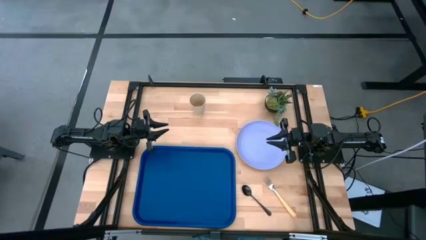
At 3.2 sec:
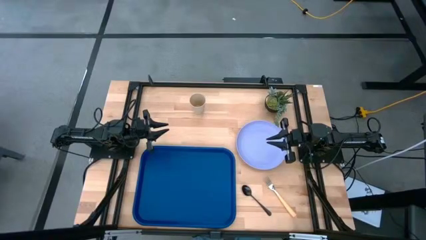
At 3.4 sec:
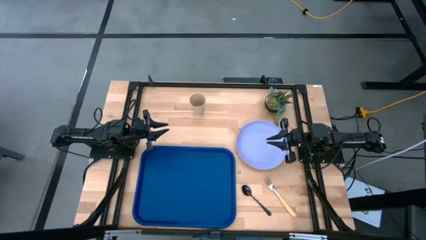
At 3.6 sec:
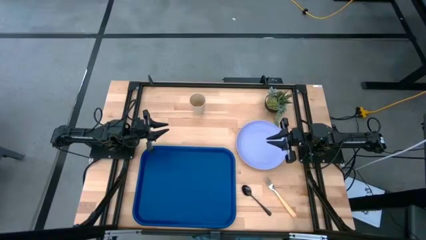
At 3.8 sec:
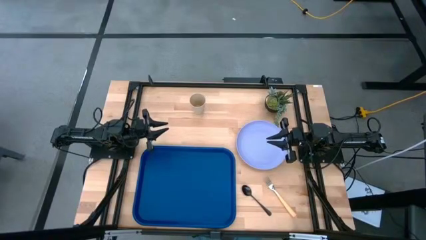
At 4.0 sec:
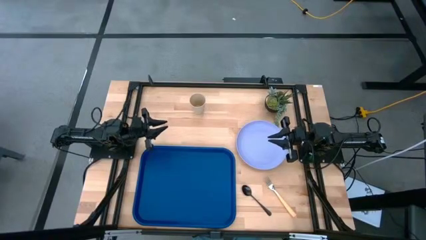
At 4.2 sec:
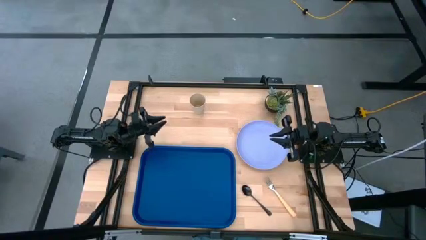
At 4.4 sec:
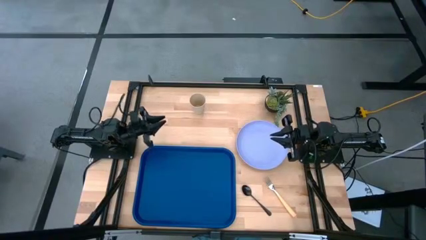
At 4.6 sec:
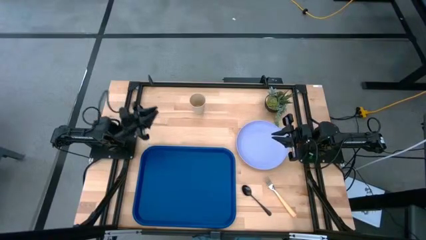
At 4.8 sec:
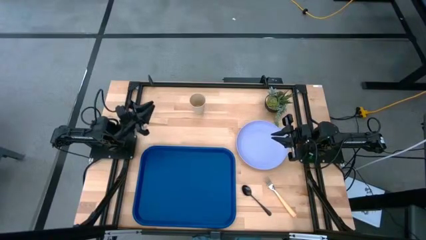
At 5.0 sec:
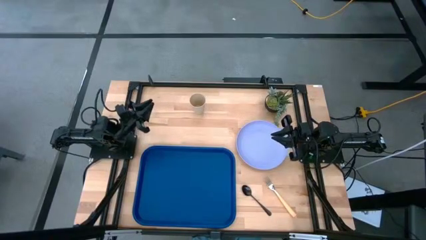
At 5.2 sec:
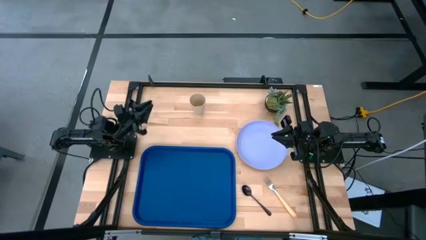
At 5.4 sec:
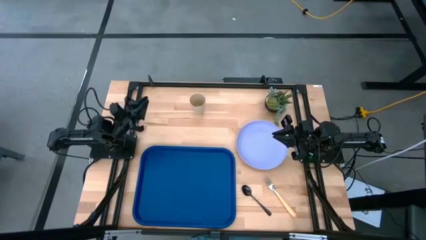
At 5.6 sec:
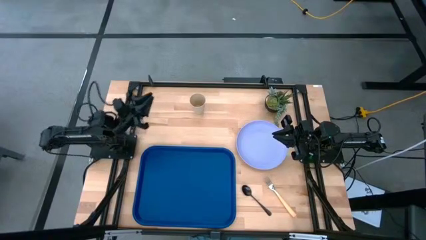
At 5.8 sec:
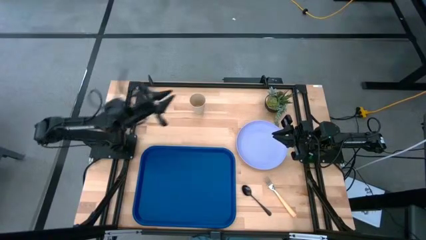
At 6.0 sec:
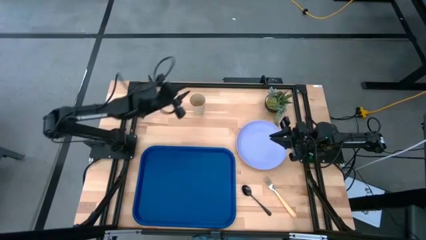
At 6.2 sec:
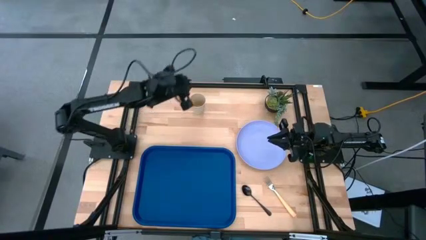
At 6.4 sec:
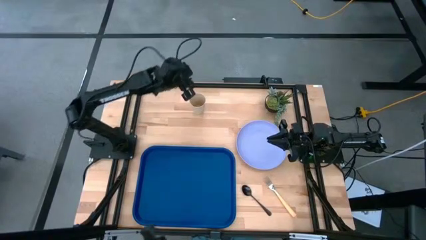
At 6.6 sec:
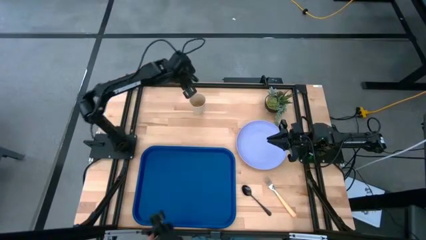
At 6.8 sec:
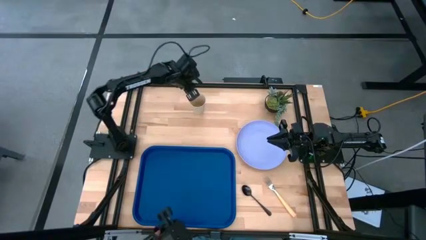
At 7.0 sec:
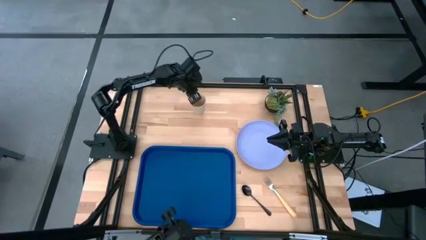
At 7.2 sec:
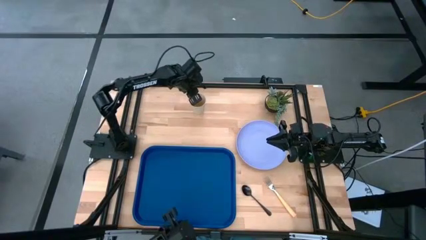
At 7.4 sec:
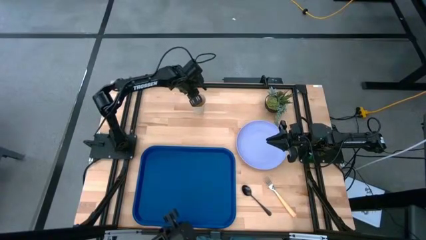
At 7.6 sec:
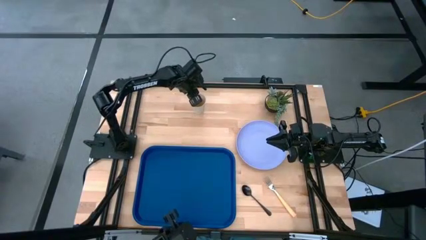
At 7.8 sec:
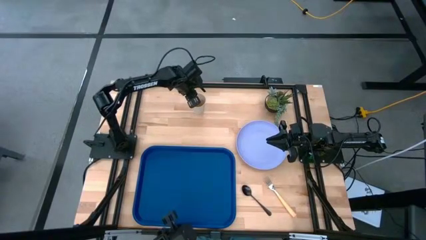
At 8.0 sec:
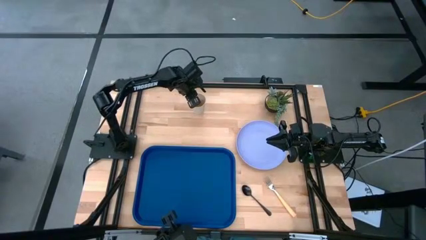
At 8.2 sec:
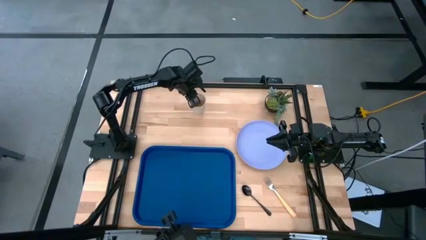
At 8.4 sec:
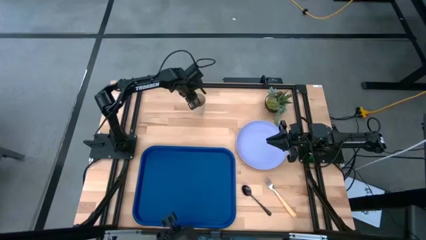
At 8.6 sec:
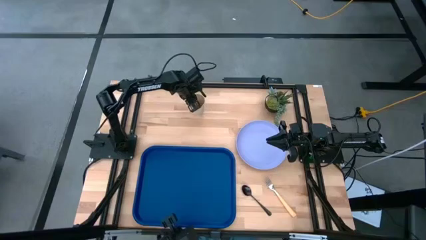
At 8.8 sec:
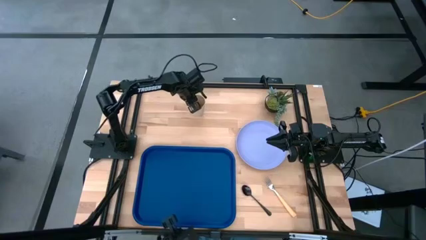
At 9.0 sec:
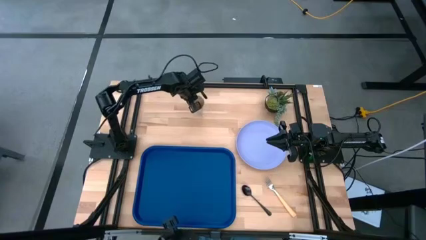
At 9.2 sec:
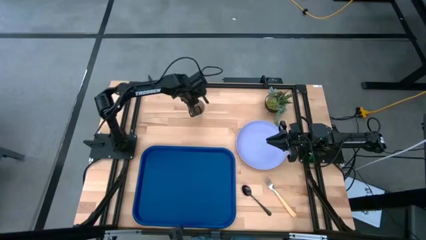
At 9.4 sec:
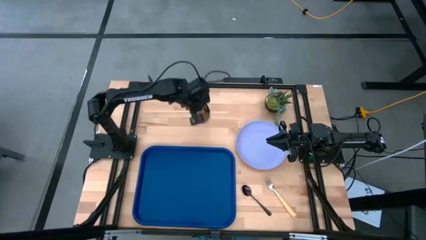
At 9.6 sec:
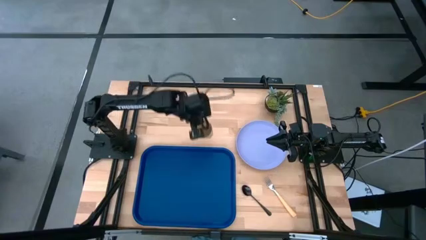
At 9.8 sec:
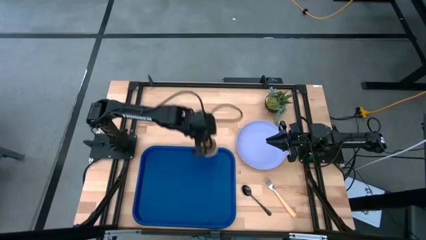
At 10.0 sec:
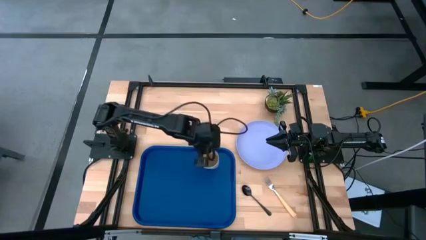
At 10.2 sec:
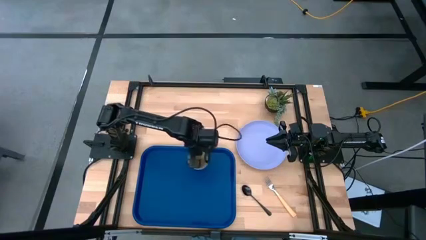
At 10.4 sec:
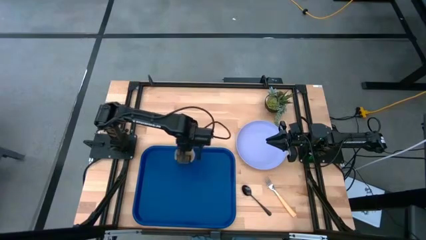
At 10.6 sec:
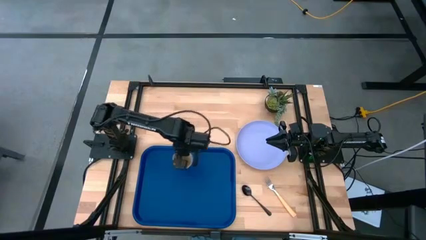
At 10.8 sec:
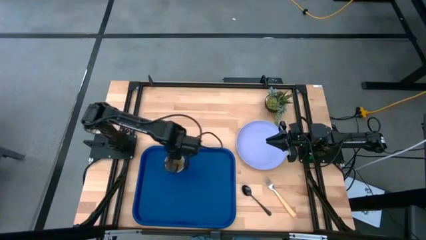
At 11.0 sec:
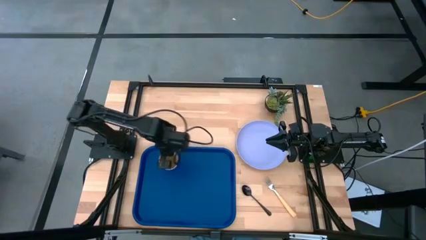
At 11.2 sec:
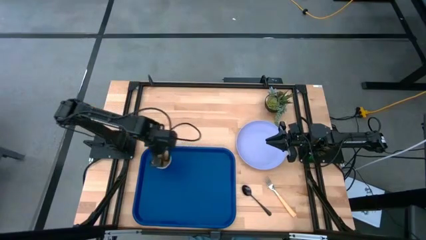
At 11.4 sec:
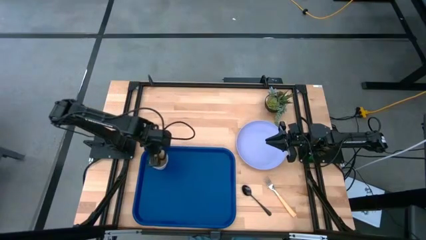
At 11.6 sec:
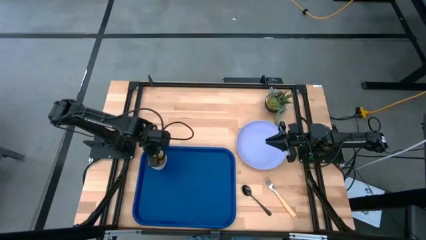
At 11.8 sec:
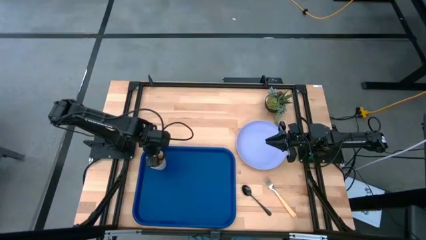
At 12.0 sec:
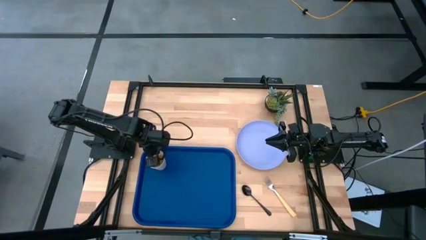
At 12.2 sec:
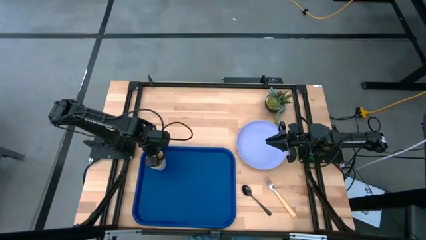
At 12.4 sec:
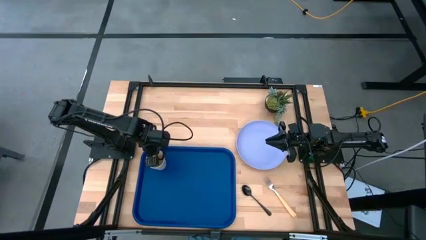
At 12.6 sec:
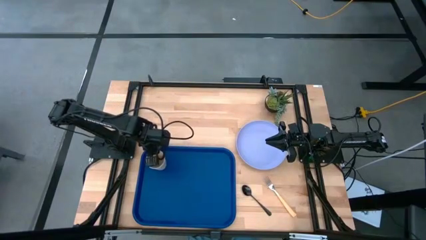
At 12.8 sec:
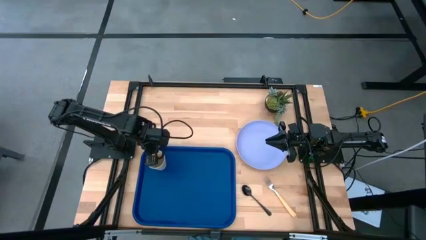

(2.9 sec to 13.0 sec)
Task: Pick and place plate/cup/fork/spoon on tray
Put the white cup on the blue serving tray

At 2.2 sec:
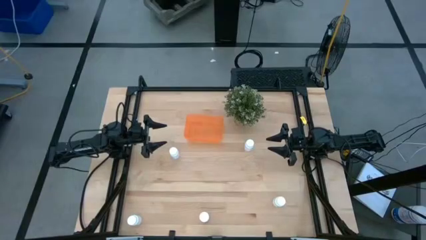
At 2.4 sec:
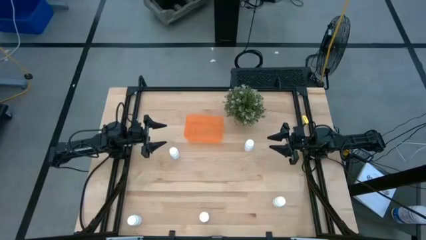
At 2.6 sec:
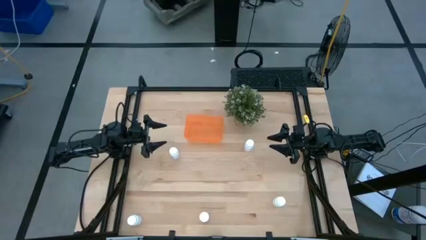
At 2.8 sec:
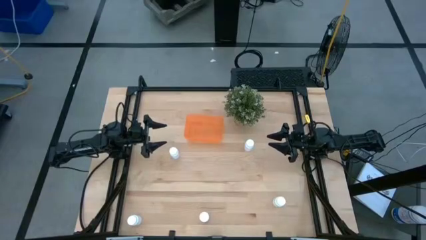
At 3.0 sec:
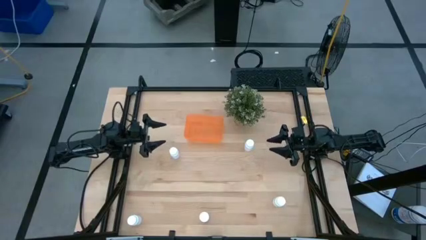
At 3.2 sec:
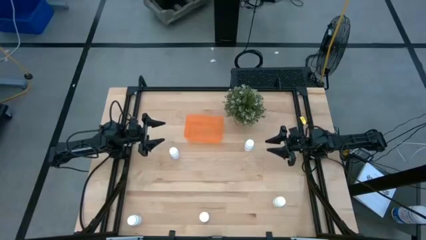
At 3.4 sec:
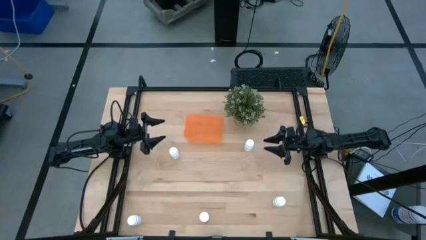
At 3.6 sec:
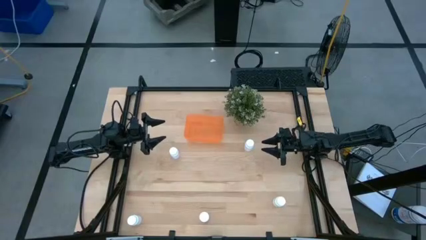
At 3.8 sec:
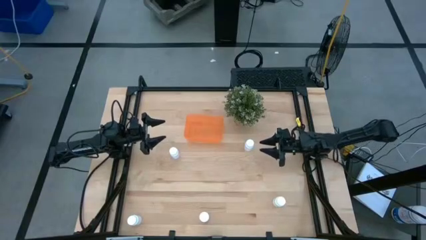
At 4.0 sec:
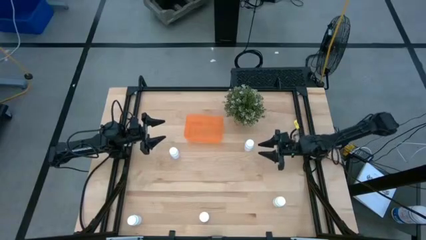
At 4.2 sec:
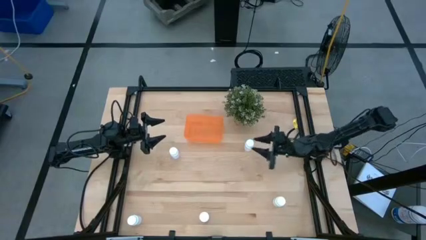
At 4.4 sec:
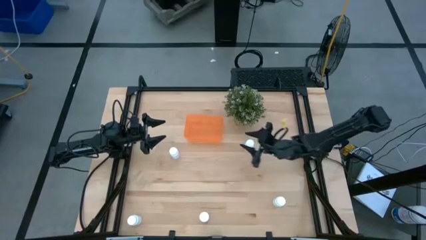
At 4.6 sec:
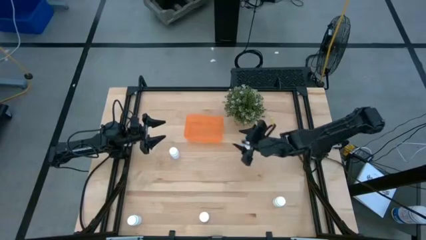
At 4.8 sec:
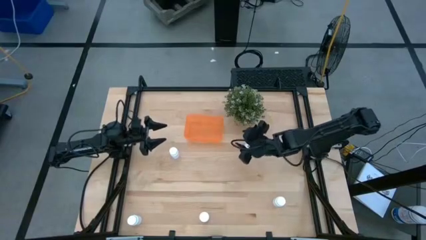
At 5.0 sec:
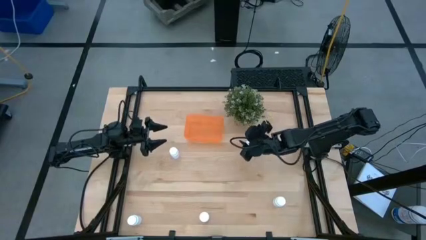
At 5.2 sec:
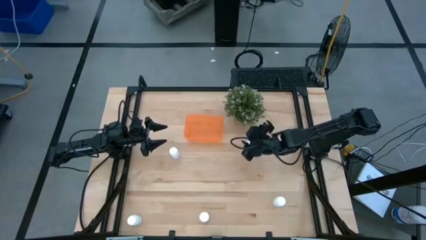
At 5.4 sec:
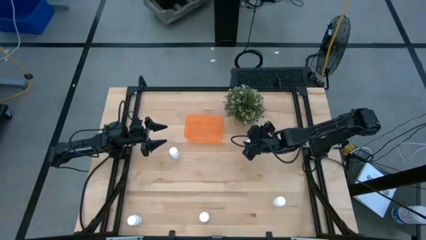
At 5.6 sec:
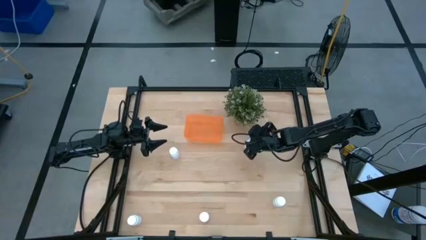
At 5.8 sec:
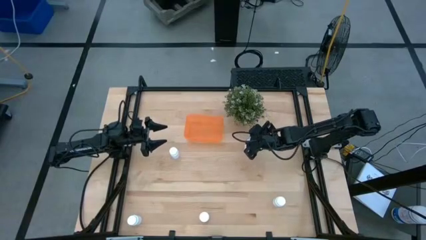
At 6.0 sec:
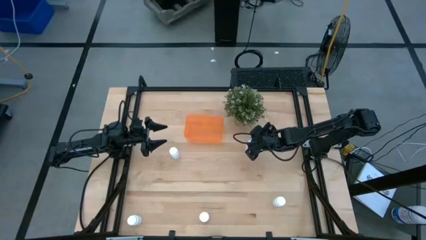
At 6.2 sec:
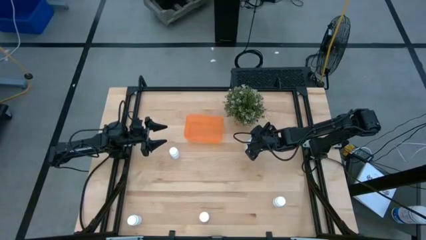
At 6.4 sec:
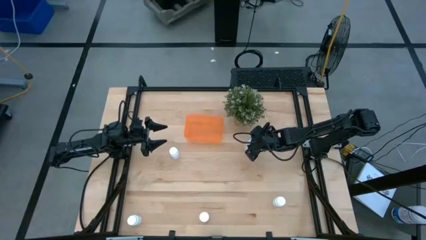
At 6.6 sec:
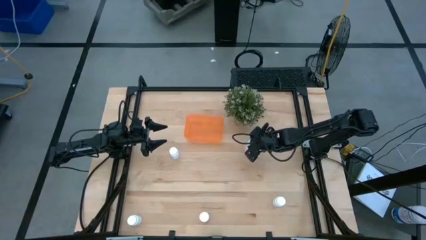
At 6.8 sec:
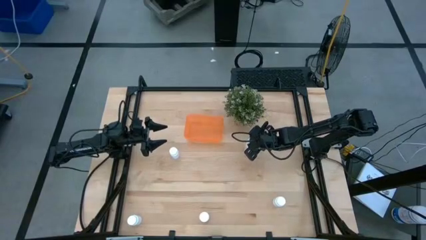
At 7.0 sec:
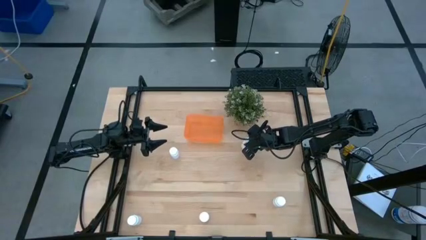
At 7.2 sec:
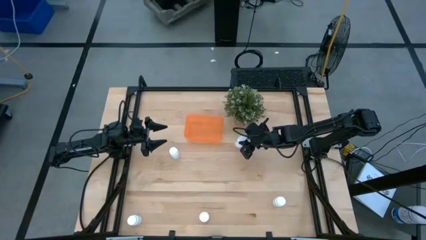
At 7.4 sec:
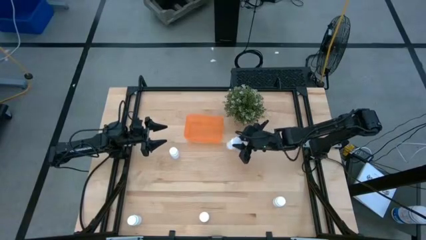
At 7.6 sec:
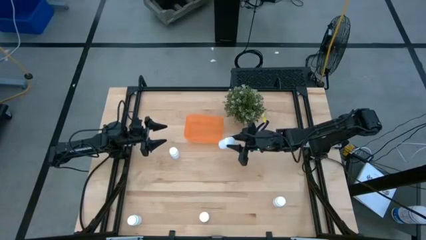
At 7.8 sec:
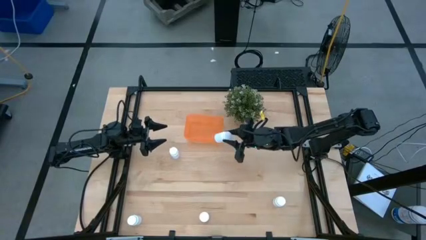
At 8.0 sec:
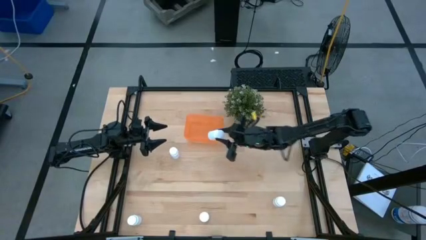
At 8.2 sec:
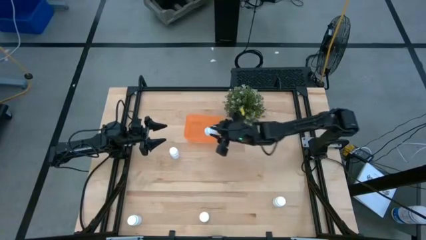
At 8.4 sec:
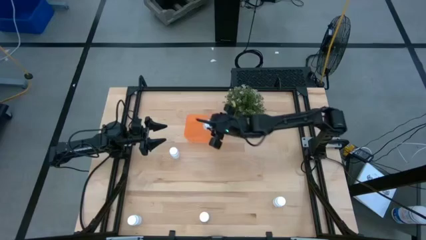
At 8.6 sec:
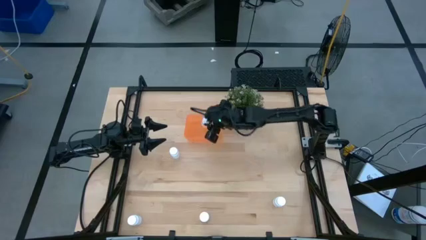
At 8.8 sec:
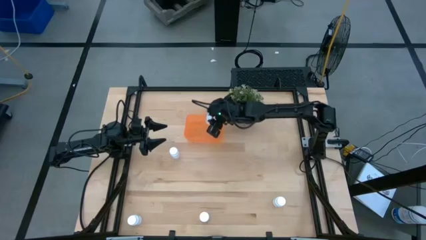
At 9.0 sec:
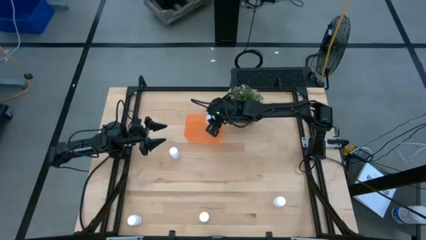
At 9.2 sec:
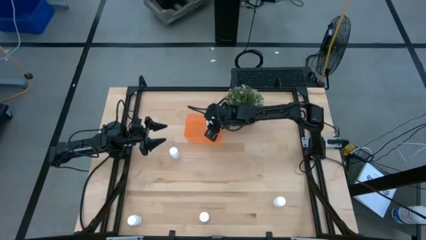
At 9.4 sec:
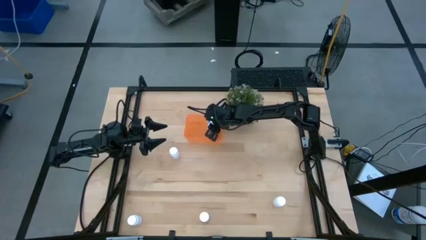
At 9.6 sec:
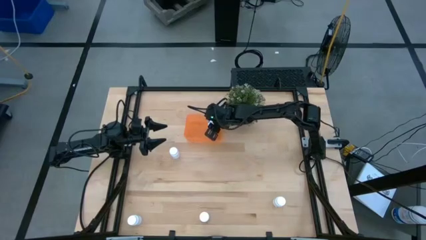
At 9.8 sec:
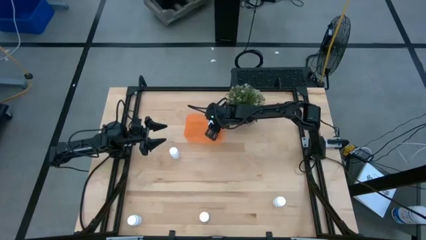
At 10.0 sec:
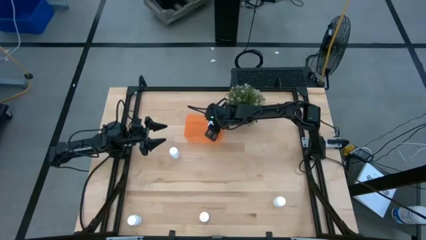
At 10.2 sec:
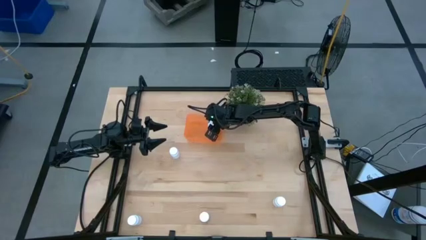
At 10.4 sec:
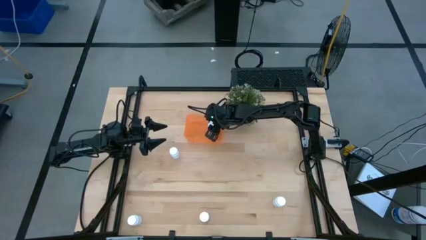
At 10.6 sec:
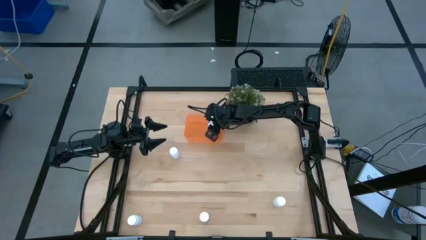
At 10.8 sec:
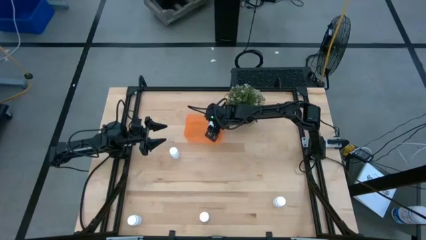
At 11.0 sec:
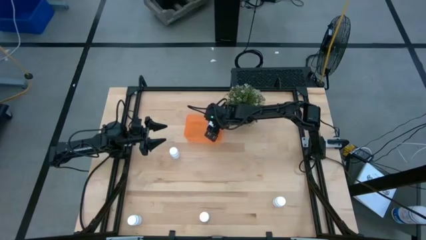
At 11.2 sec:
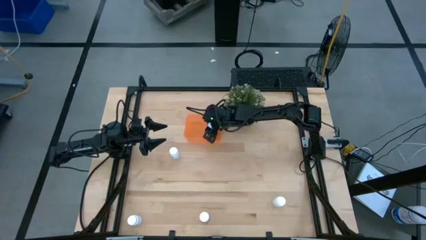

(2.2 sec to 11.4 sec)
Task: Pick and place pill bottles into a basket
Put the white pill bottle into the orange bin
